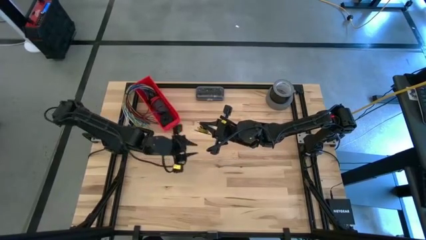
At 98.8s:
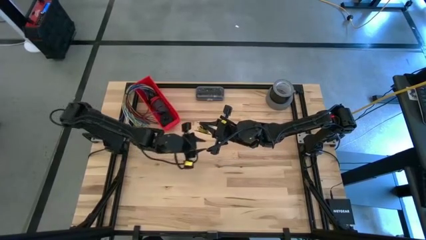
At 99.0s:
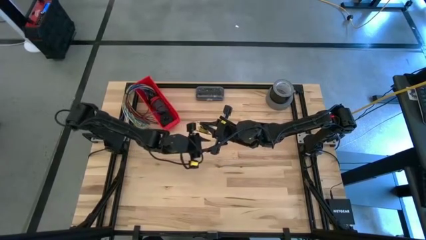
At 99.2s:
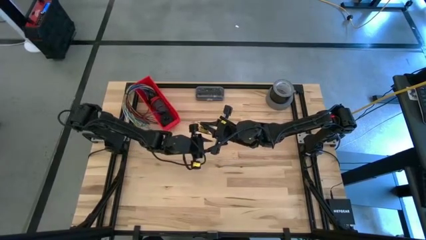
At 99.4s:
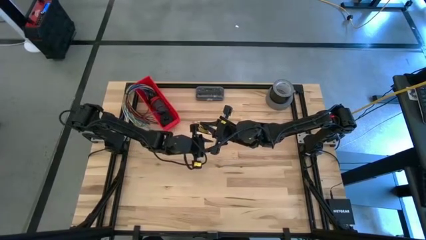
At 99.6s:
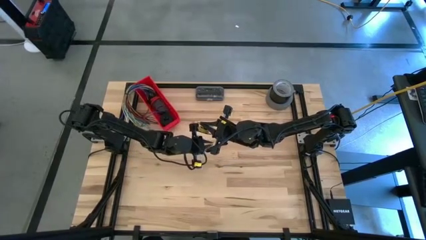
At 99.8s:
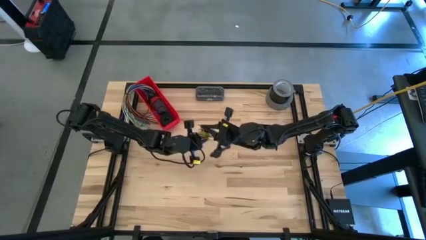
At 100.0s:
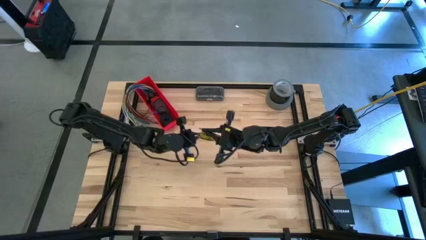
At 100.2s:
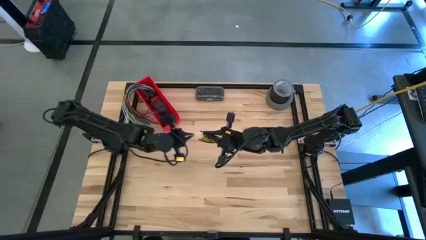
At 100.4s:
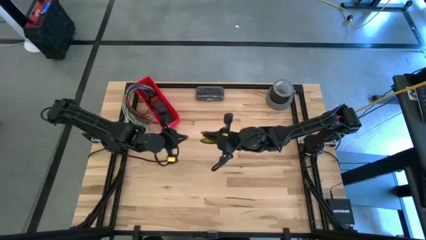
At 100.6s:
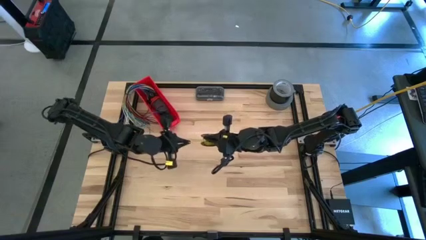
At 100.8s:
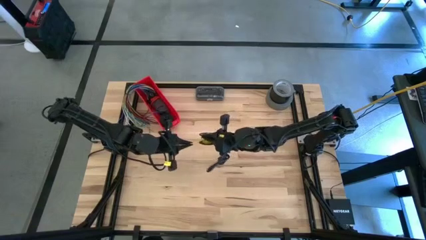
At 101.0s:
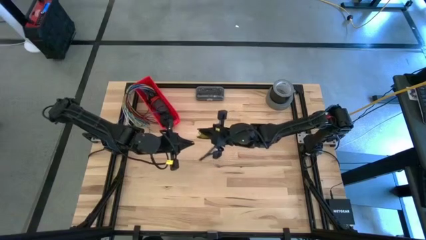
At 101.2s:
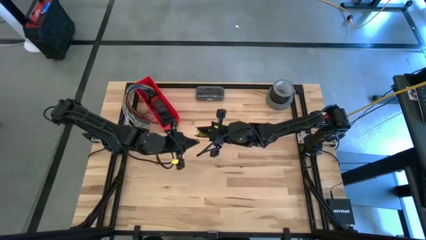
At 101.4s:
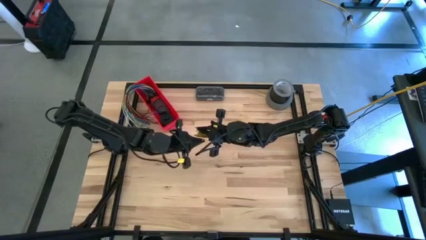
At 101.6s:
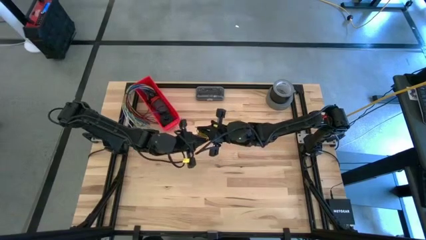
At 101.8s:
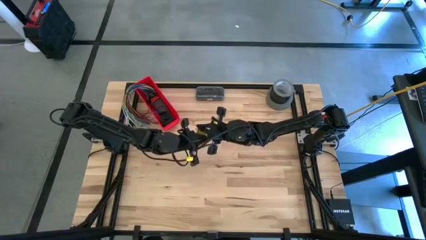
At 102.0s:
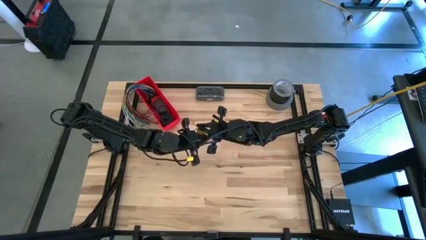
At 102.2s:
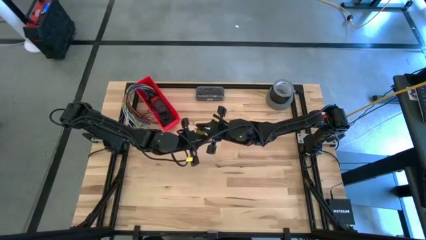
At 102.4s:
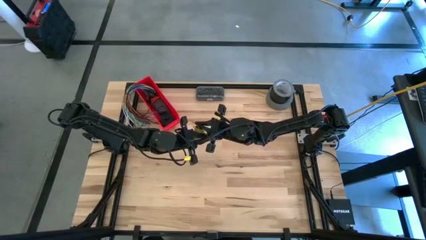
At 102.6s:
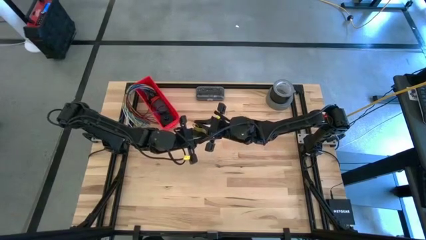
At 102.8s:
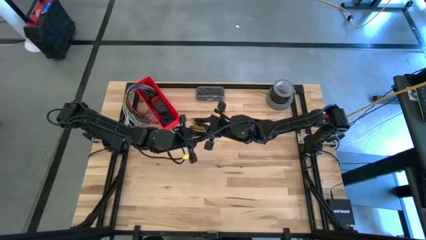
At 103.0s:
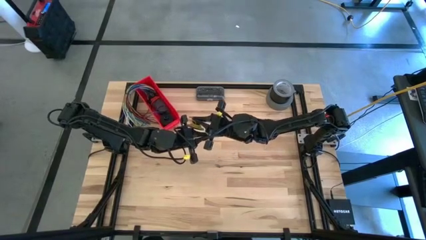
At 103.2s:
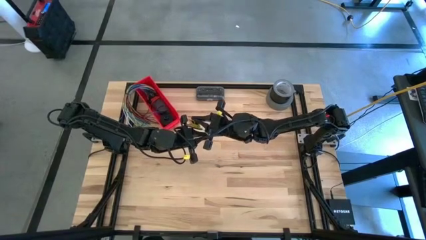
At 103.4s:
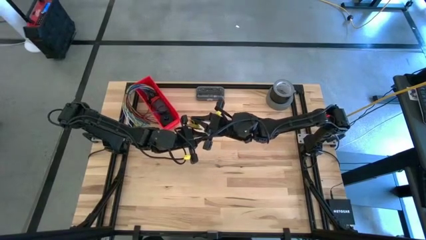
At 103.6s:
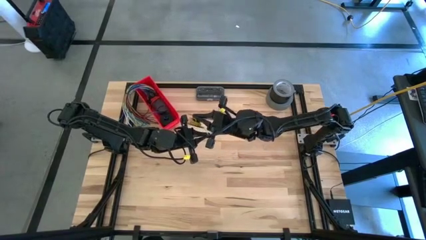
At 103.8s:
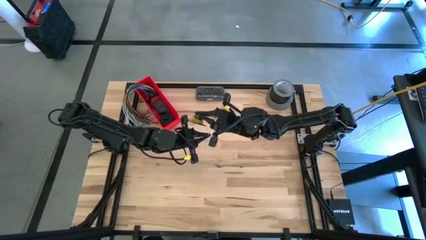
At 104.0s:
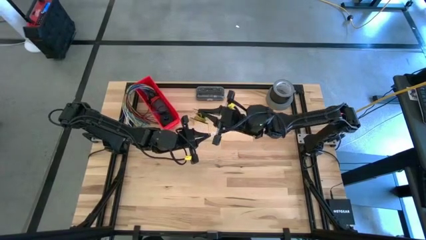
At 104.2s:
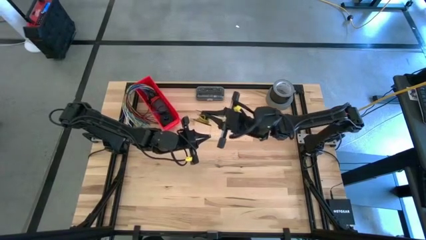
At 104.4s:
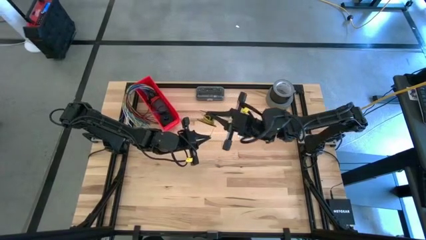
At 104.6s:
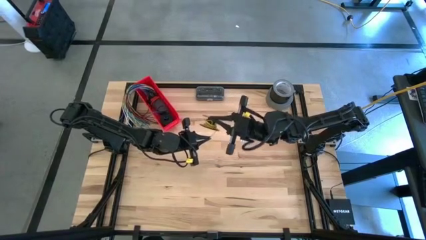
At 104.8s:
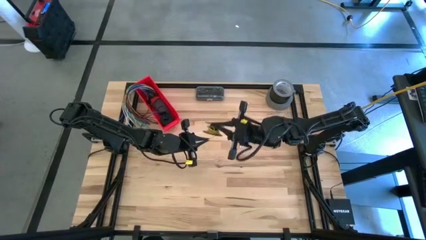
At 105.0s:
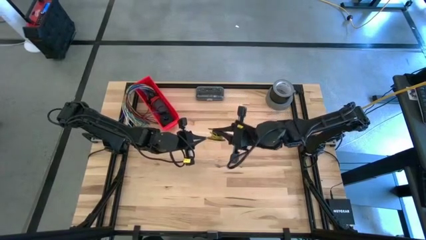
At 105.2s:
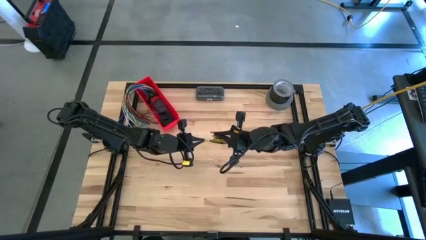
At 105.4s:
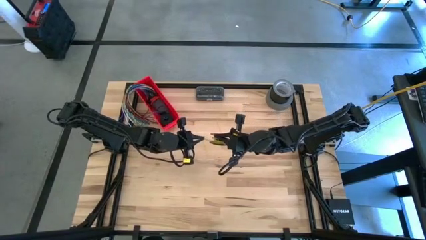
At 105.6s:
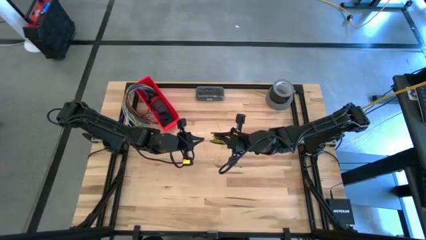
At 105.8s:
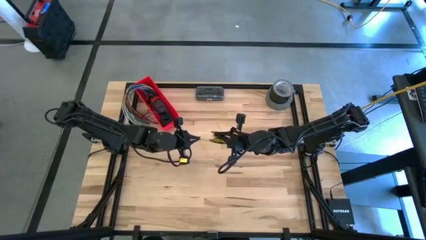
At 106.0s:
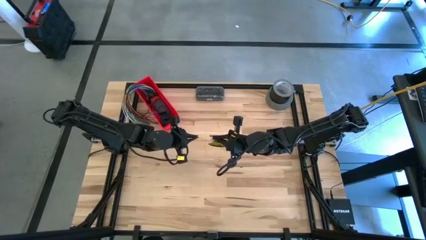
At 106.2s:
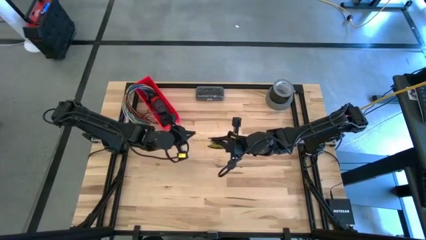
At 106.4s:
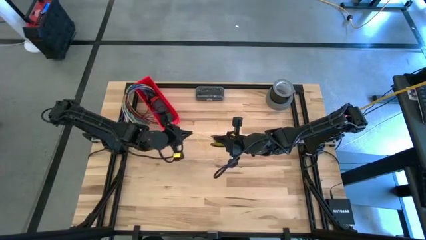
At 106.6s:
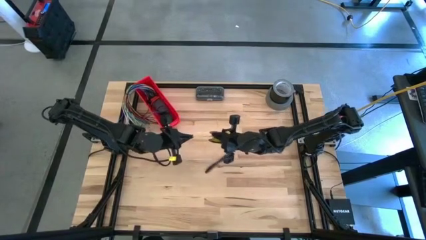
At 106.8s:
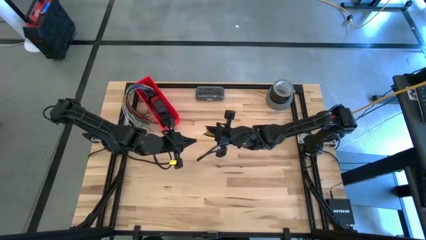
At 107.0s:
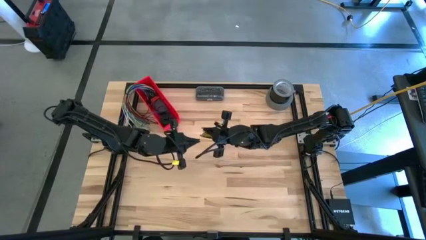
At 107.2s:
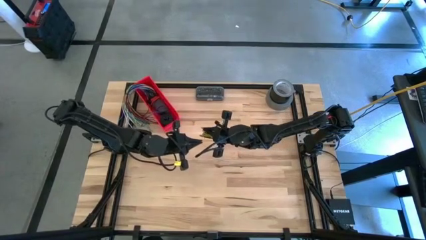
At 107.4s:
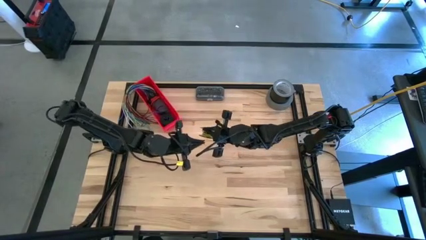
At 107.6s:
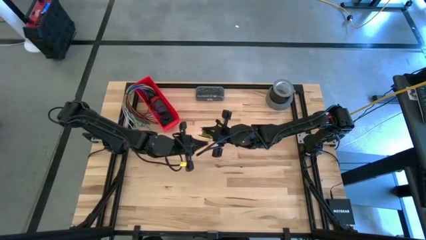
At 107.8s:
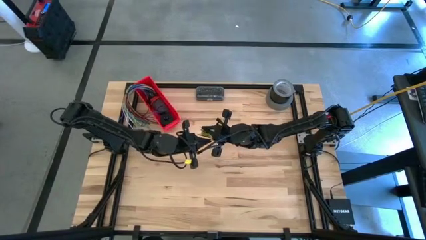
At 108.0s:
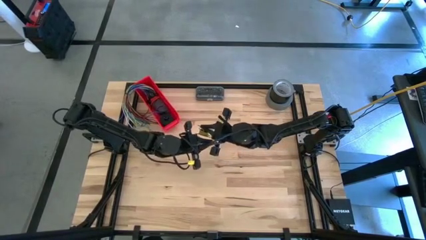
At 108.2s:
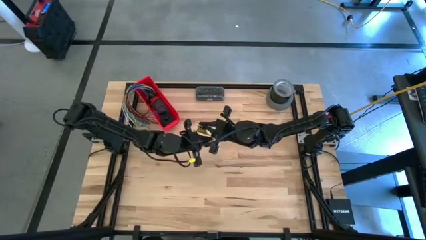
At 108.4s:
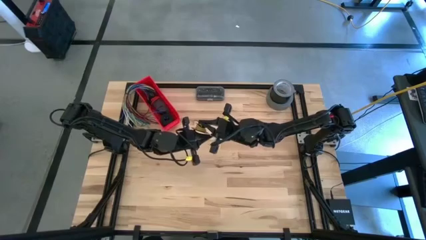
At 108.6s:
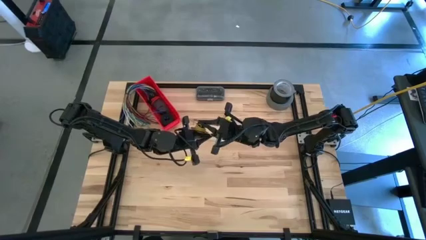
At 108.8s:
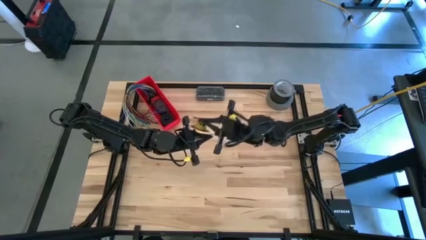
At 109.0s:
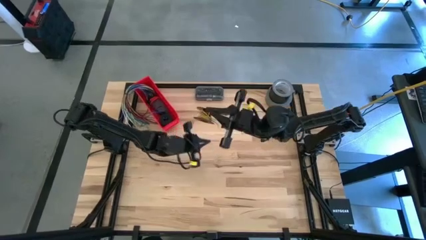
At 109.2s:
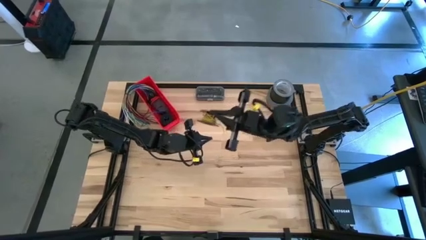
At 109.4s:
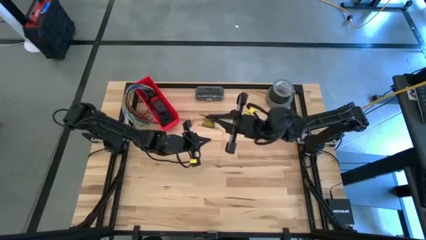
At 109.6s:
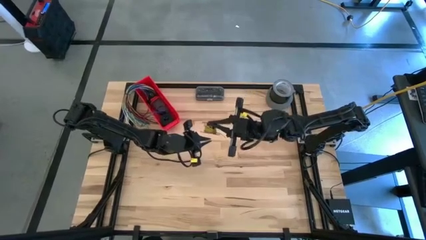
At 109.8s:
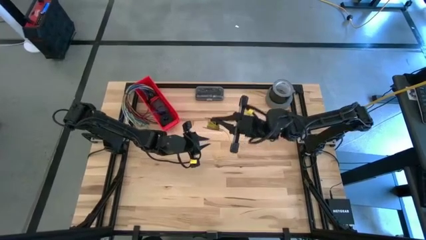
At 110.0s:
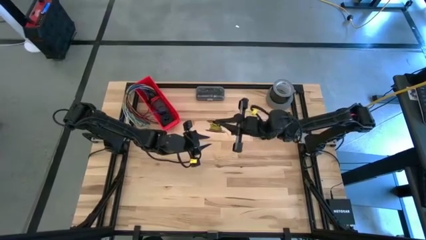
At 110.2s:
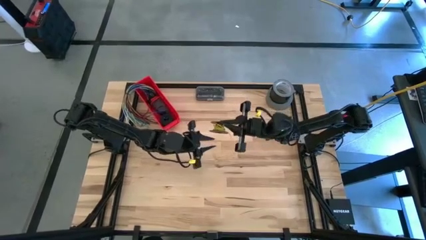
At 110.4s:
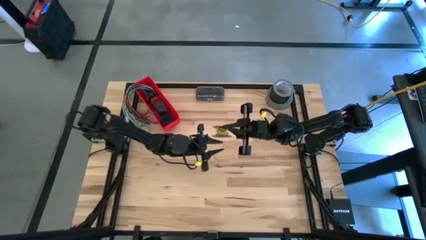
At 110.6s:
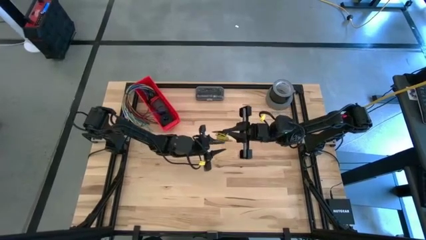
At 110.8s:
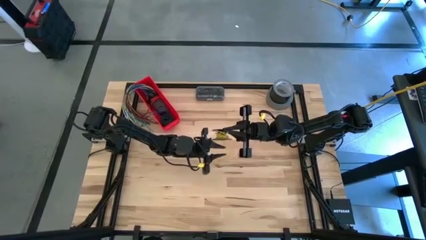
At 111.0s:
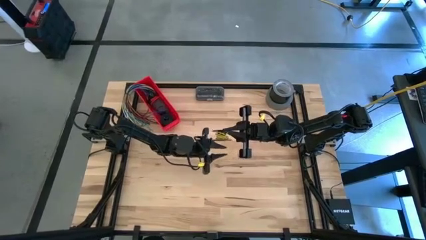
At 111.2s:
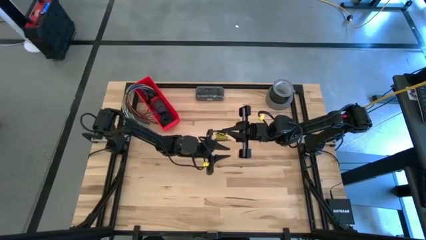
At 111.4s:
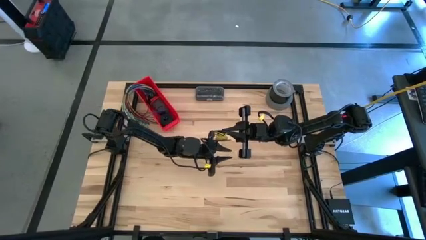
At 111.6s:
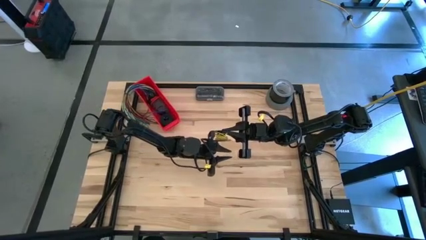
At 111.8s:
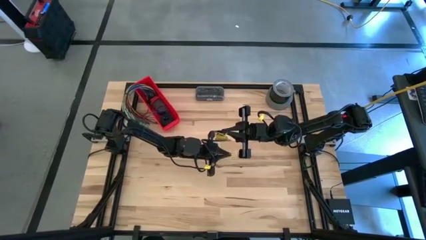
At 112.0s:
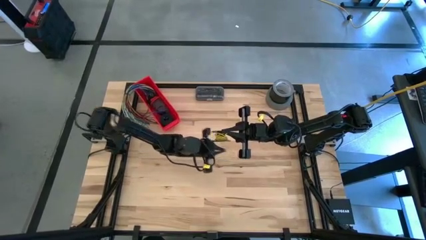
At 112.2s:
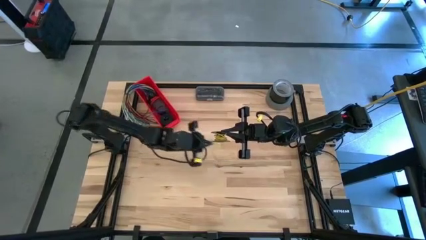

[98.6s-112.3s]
Task: Coil cords
Coil the yellow wire on the spool
